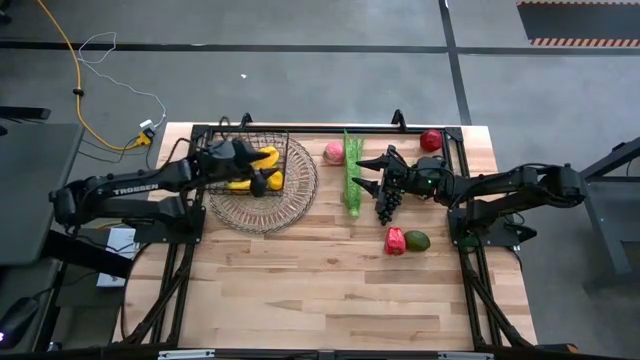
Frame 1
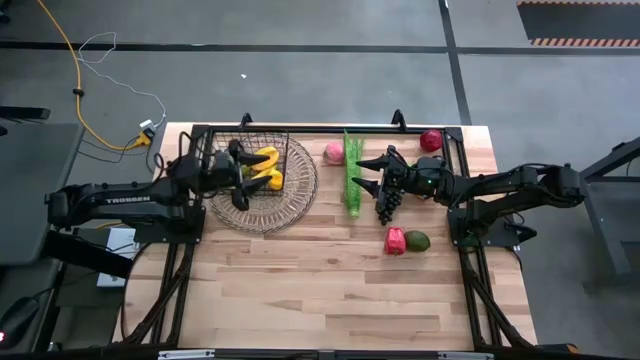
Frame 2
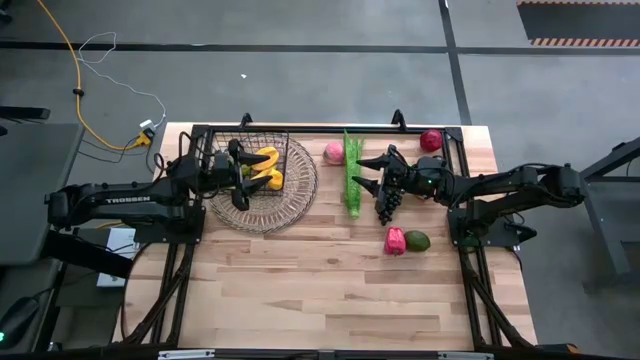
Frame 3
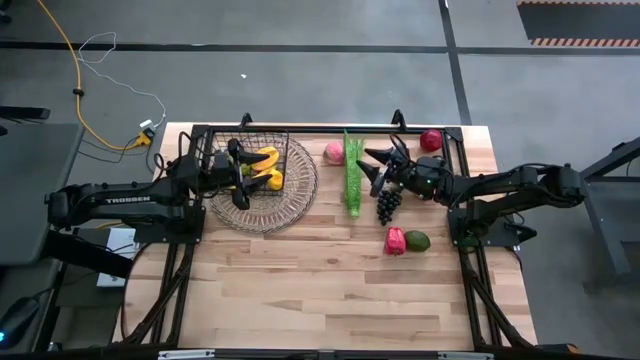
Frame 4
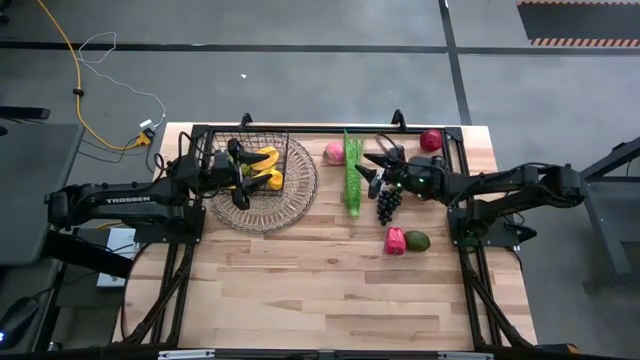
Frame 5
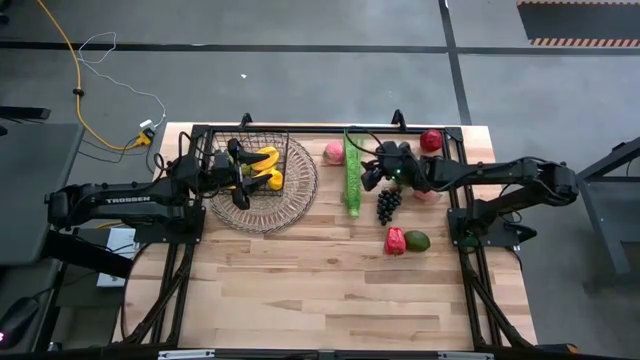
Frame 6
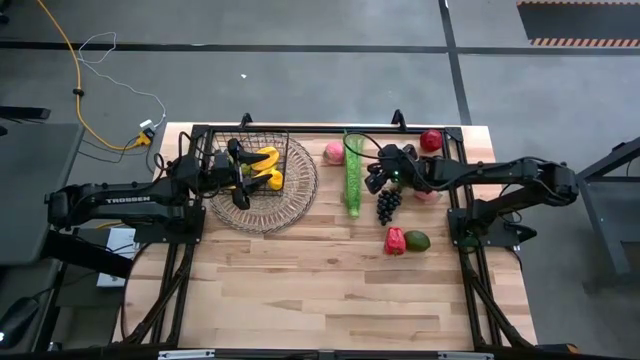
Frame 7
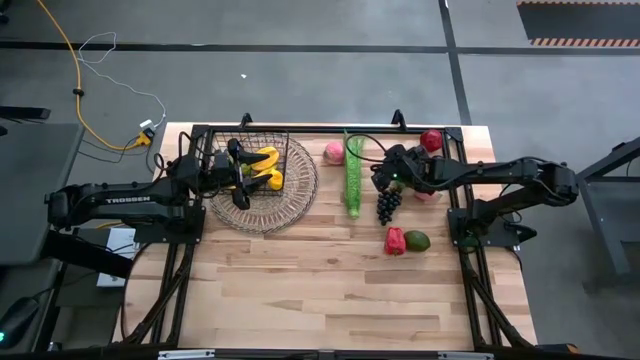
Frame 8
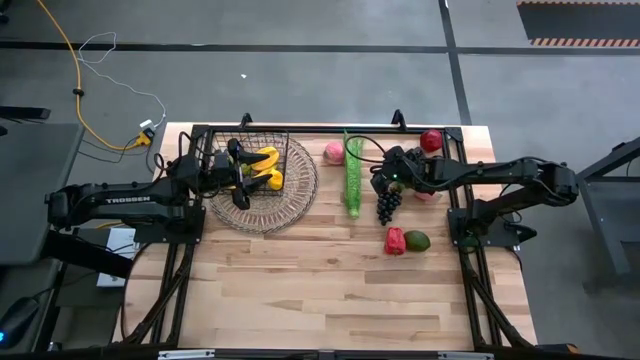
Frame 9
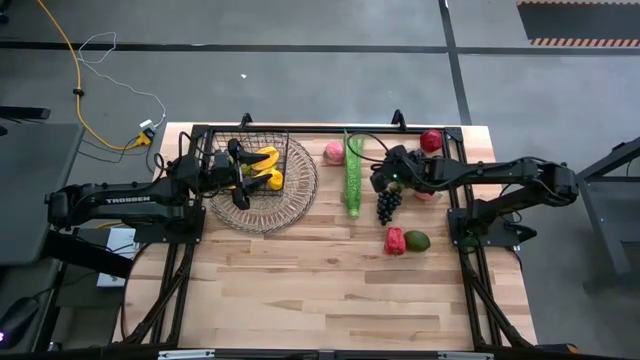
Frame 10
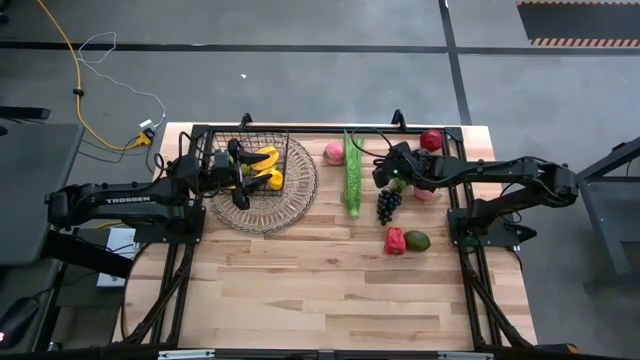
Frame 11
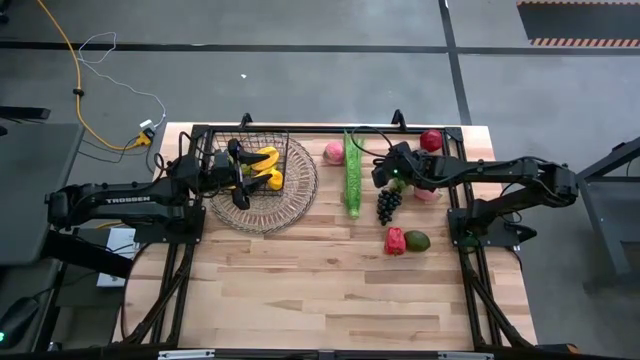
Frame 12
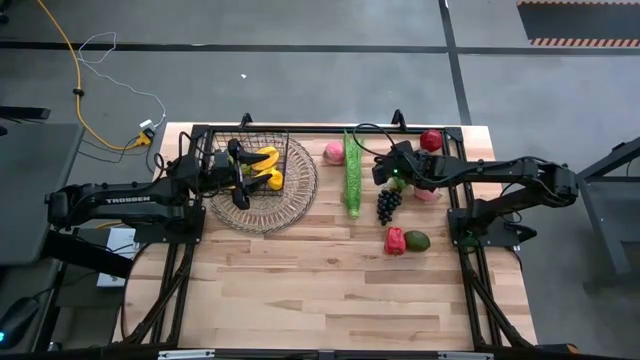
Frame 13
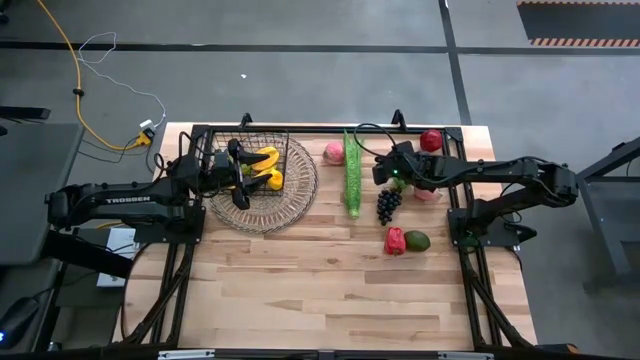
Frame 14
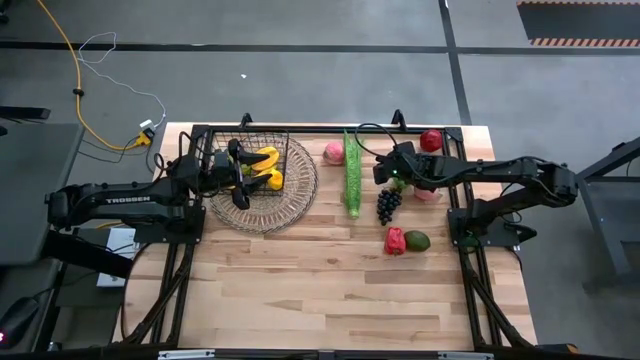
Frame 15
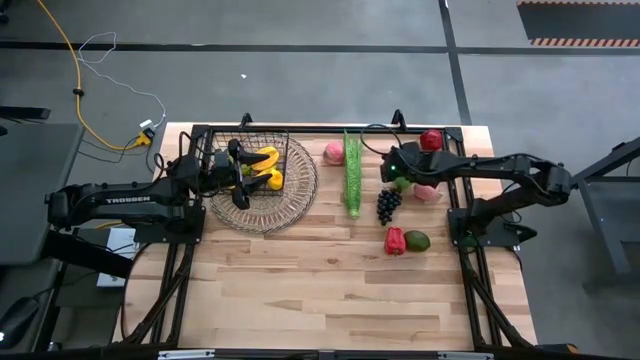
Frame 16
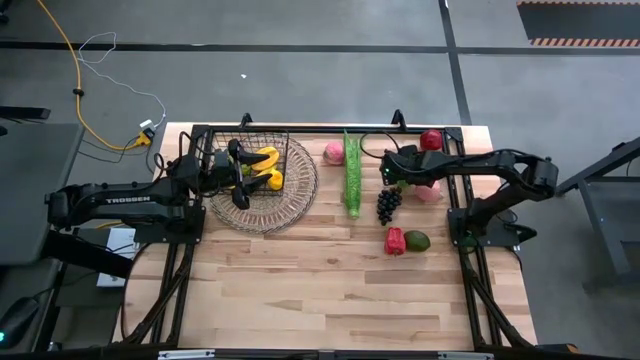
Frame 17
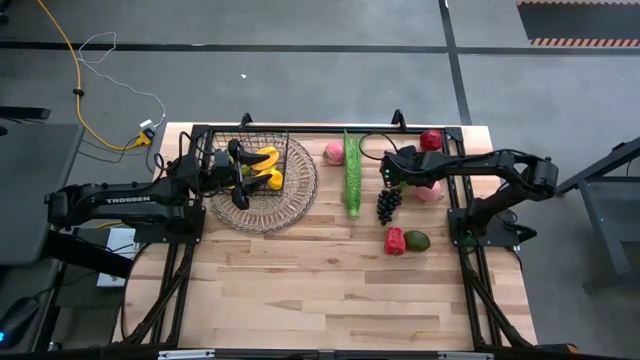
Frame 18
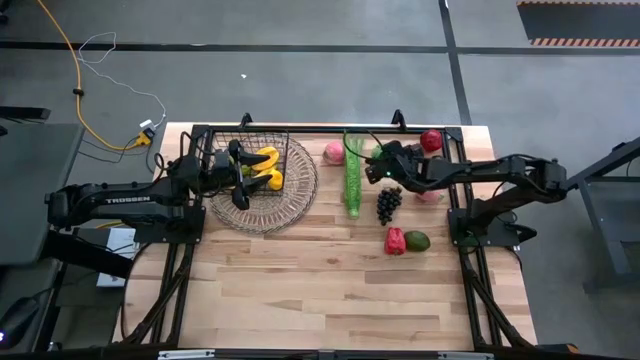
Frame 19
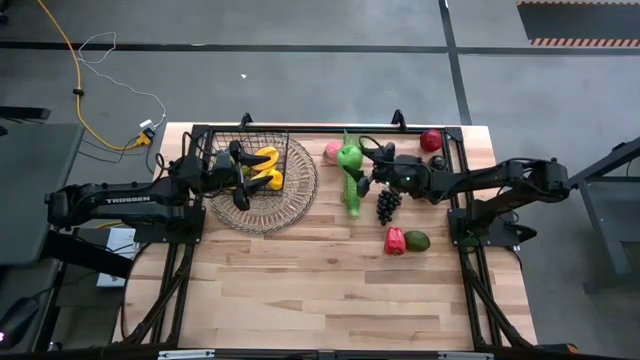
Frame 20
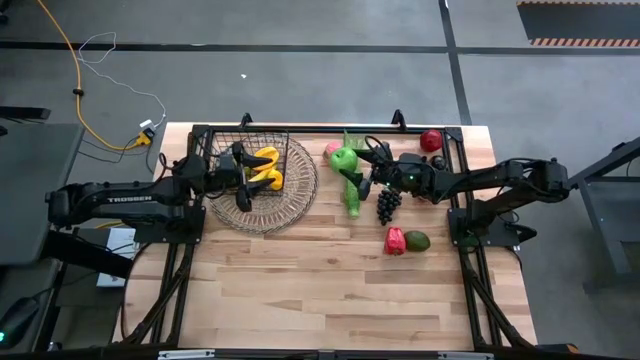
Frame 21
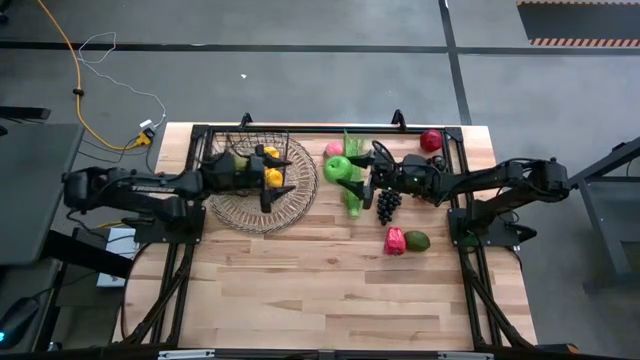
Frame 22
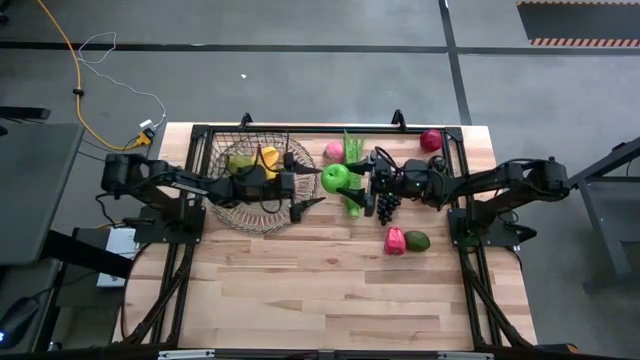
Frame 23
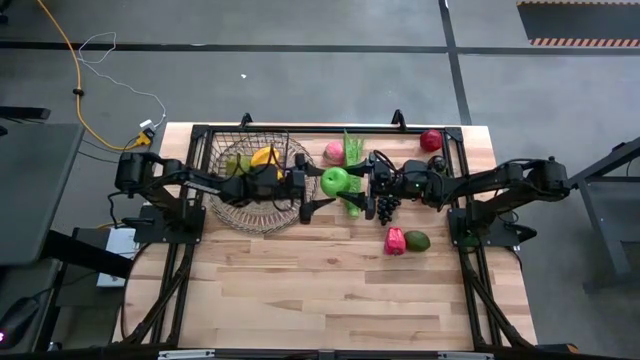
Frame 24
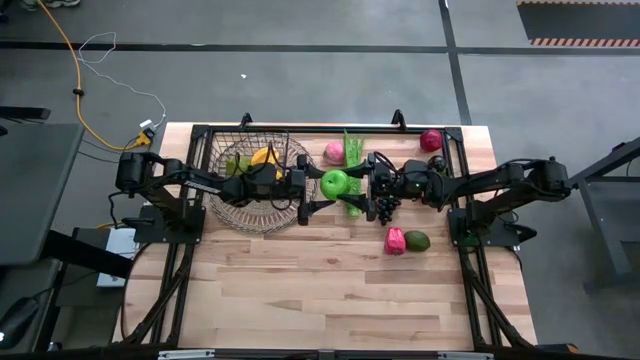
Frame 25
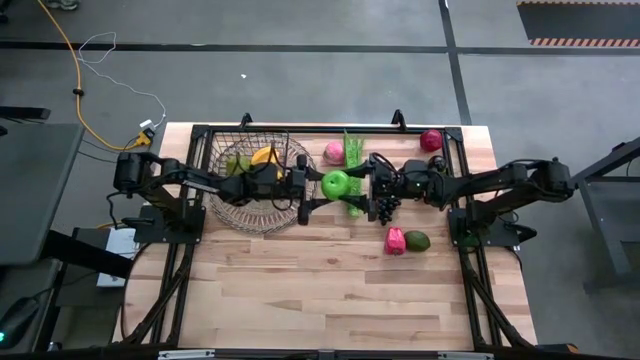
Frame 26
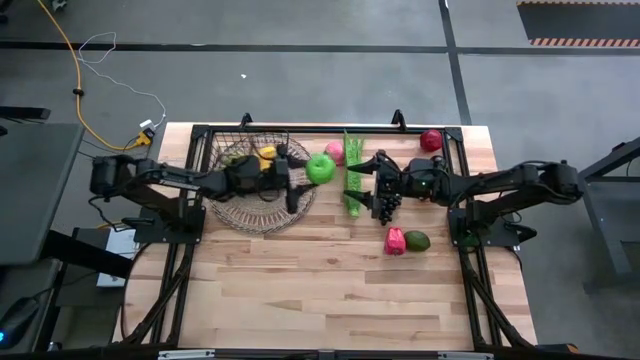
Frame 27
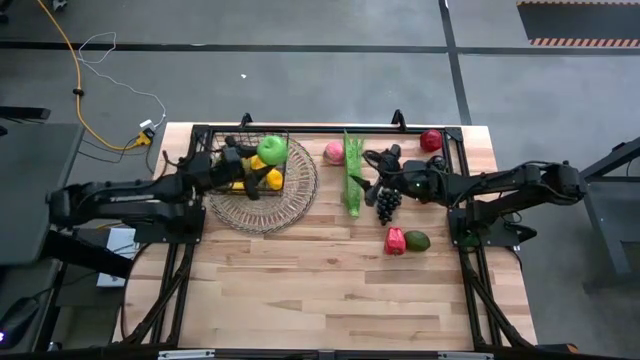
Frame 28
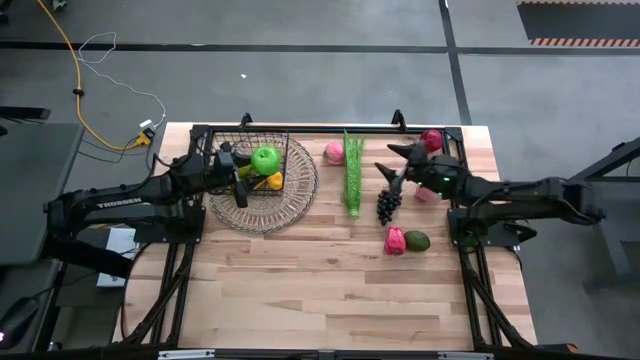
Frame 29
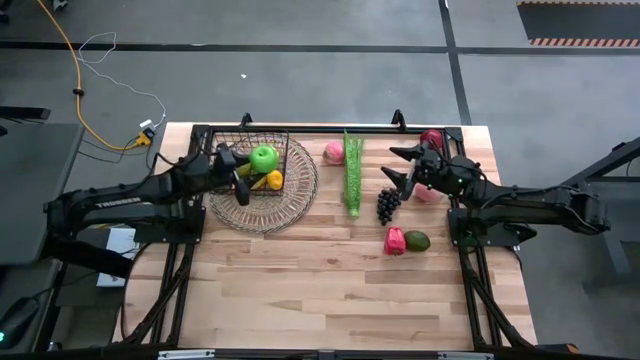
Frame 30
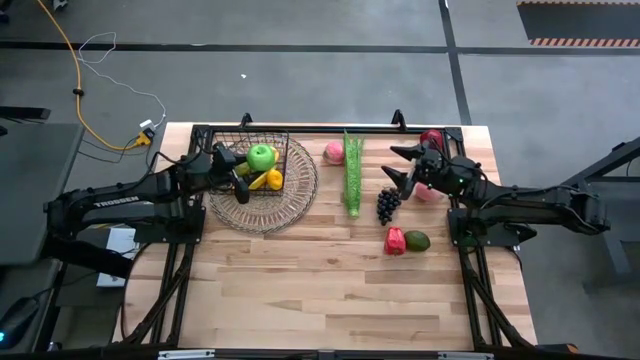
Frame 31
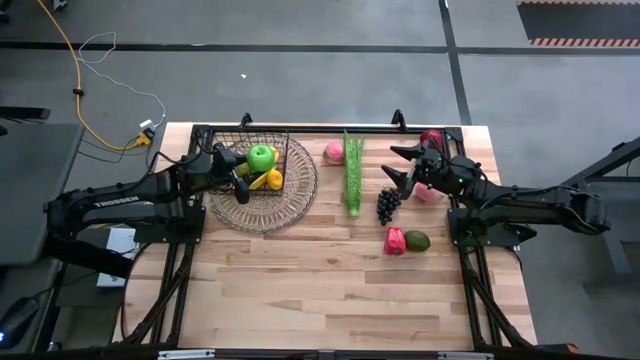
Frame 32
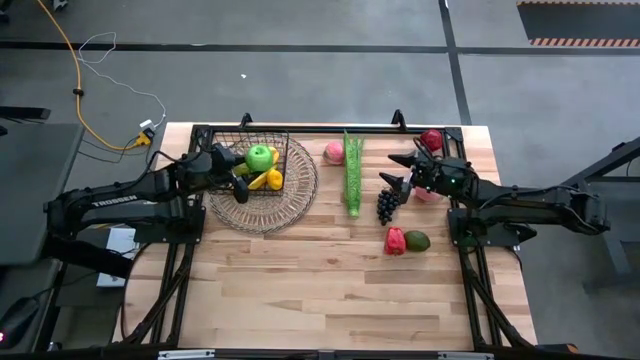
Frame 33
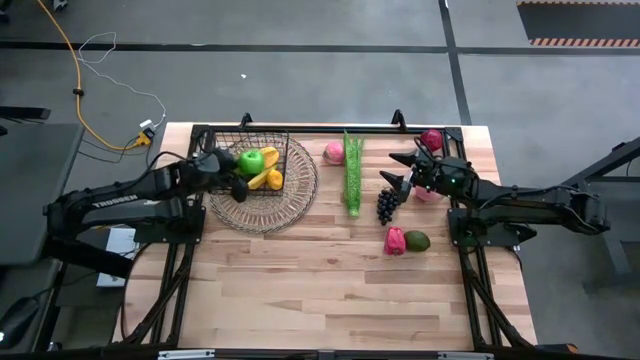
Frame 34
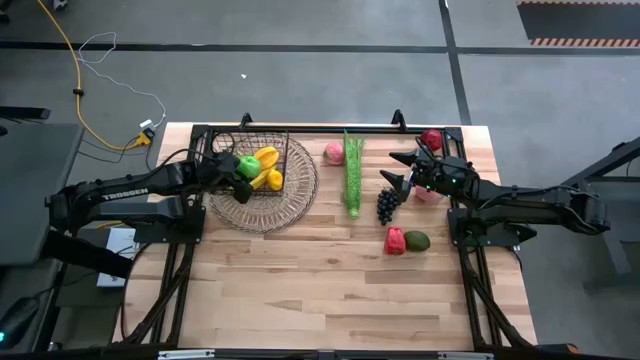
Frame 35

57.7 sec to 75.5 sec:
Task: Build produce basket
Put the green apple into the black wire basket

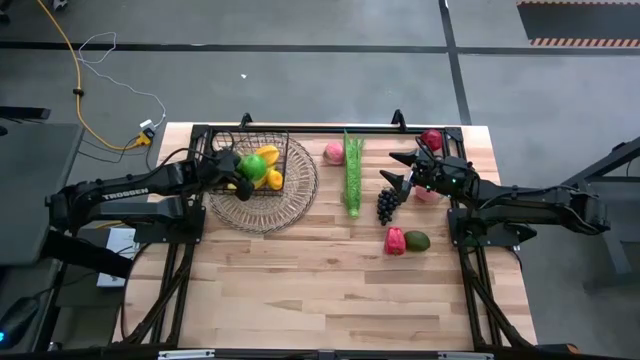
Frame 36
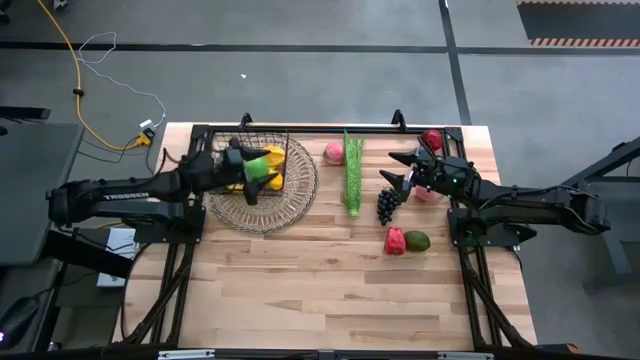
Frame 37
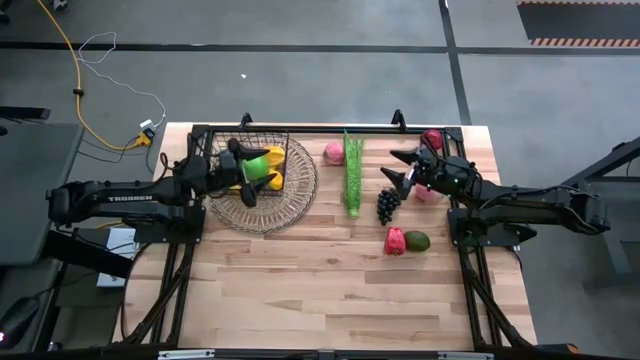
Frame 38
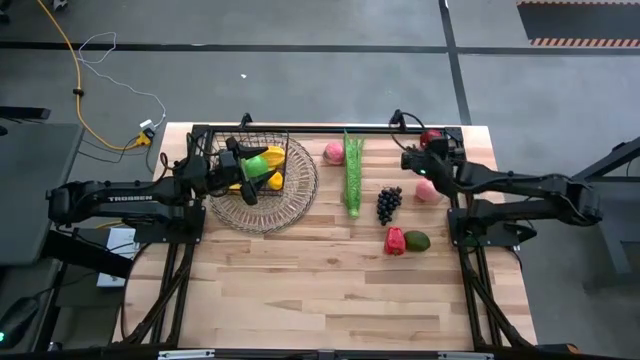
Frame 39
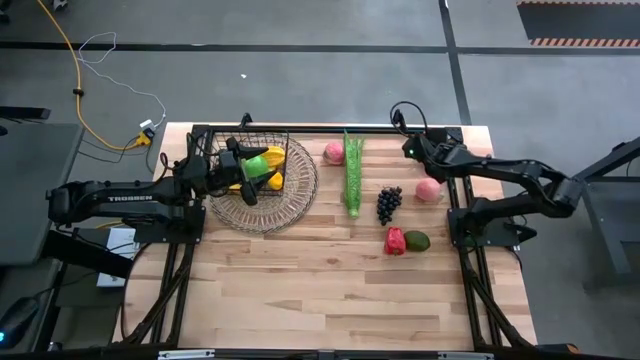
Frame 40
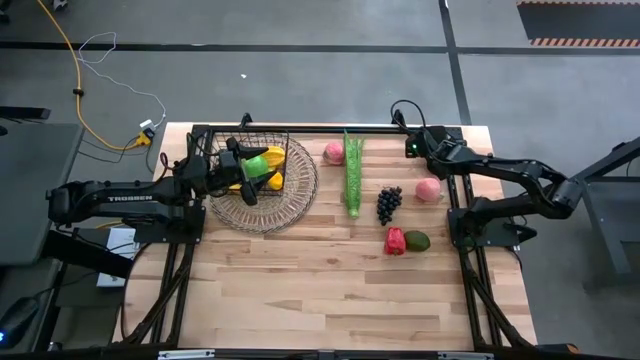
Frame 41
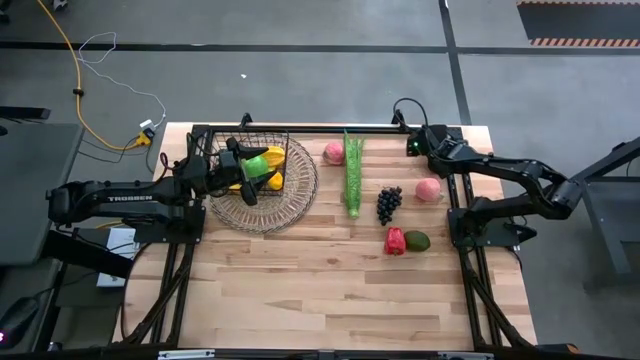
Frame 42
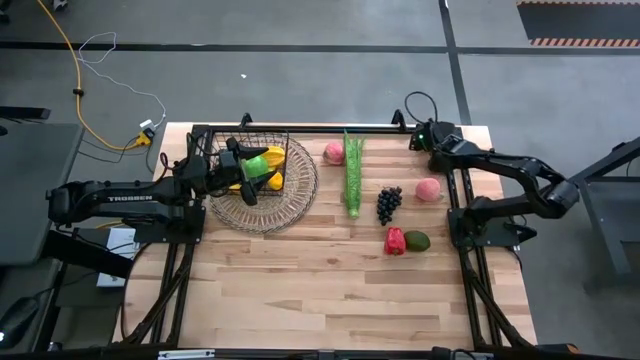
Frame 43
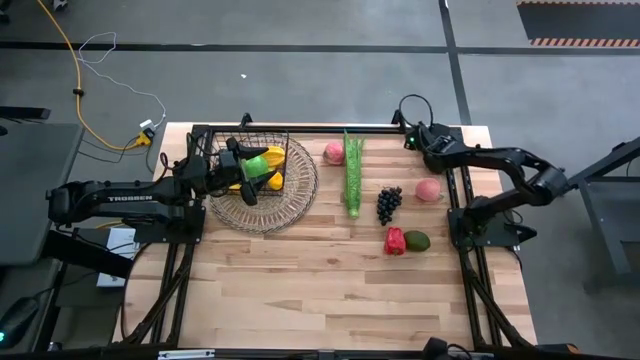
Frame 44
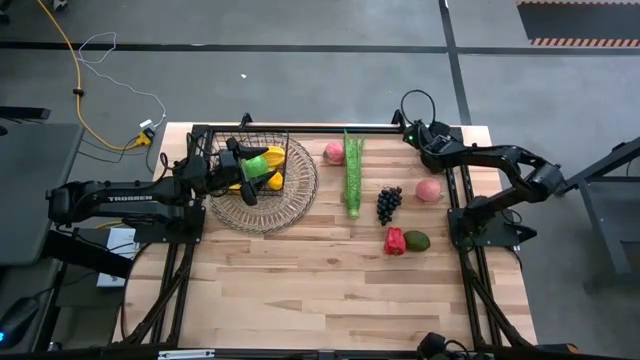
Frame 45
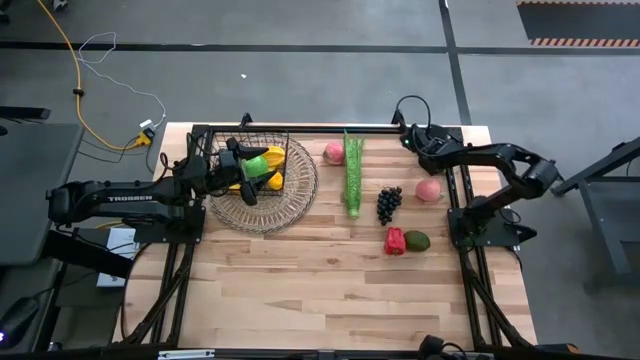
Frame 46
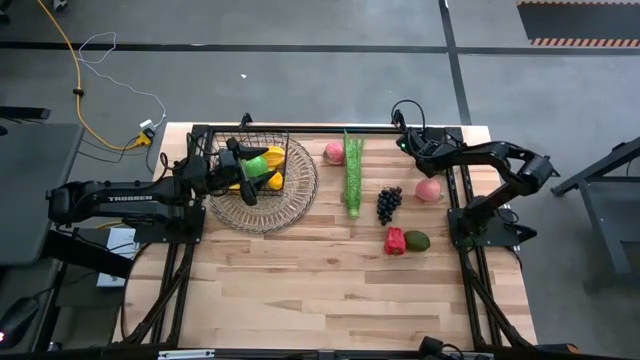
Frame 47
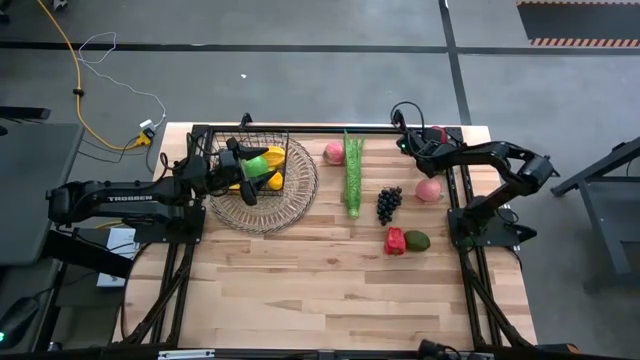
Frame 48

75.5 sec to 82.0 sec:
Put the red pomegranate into the black wire basket
